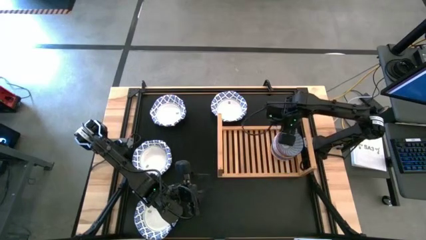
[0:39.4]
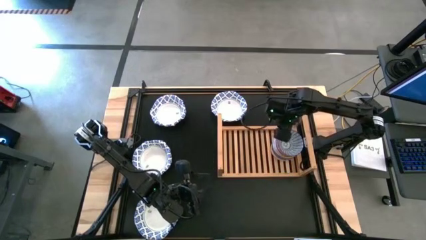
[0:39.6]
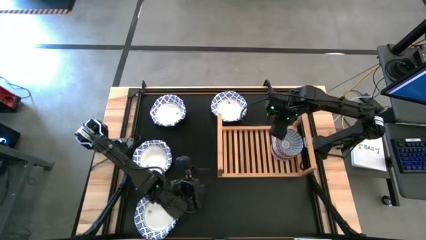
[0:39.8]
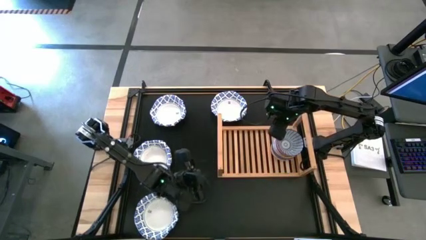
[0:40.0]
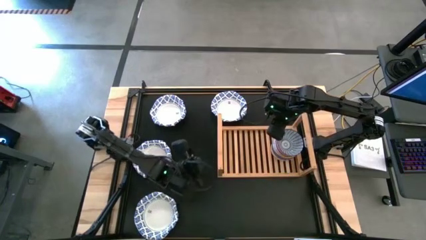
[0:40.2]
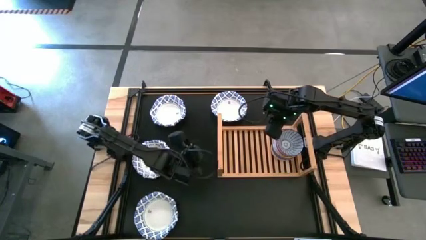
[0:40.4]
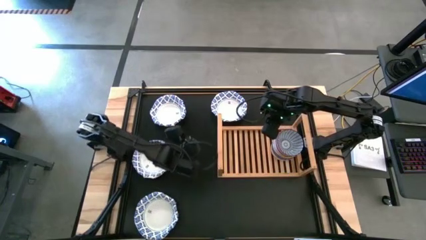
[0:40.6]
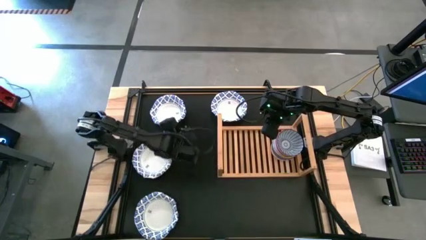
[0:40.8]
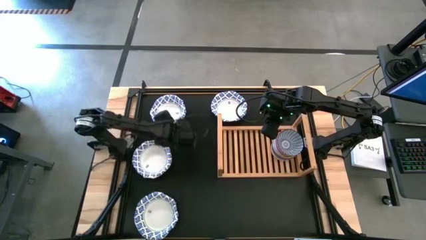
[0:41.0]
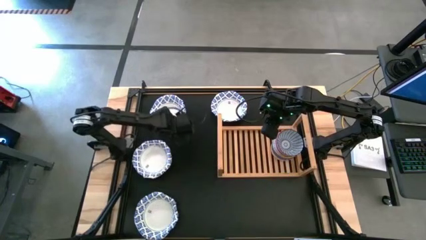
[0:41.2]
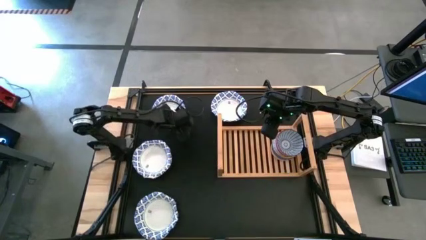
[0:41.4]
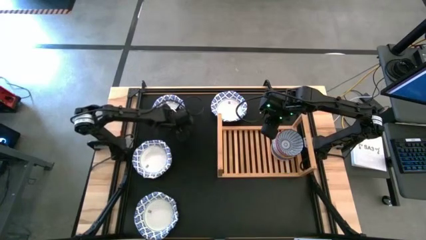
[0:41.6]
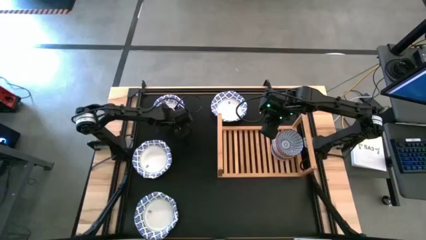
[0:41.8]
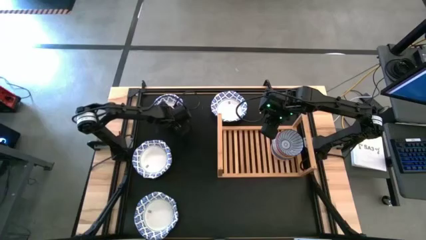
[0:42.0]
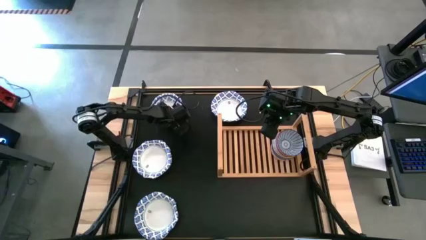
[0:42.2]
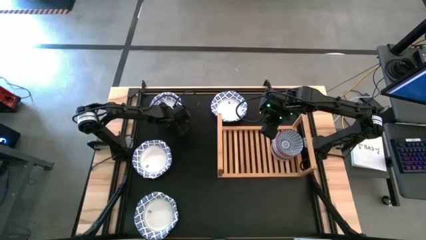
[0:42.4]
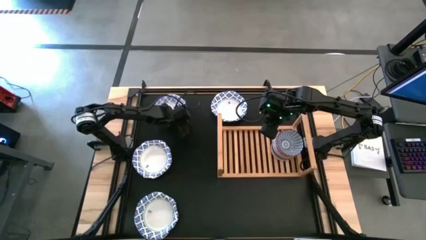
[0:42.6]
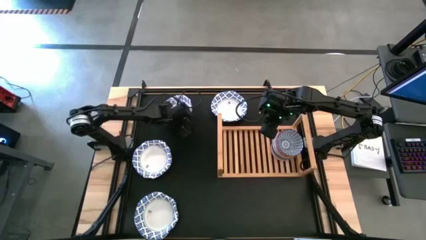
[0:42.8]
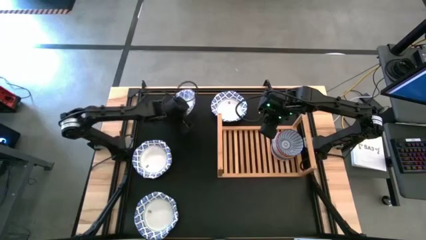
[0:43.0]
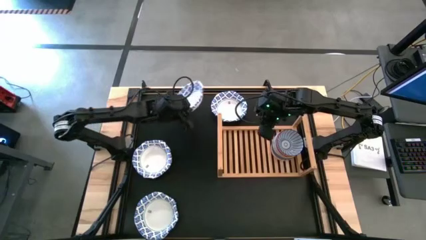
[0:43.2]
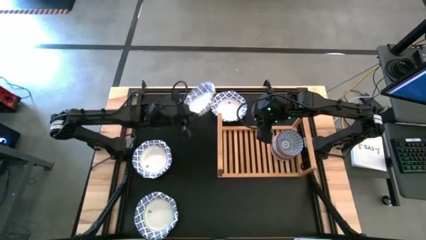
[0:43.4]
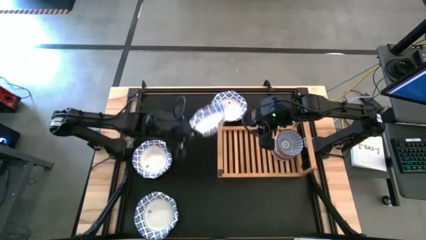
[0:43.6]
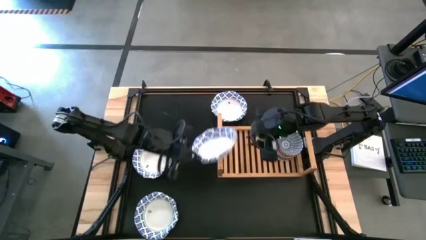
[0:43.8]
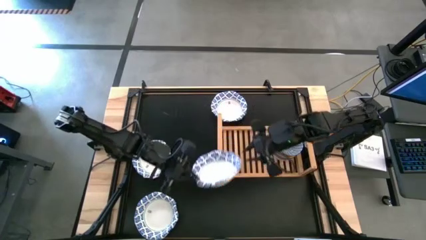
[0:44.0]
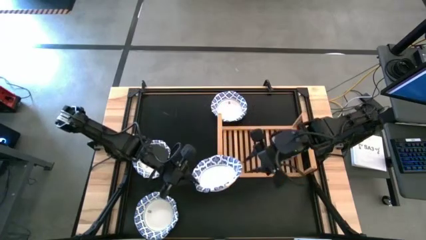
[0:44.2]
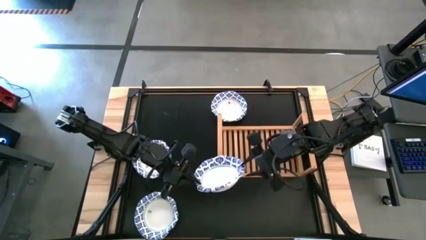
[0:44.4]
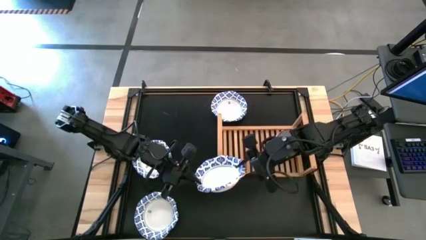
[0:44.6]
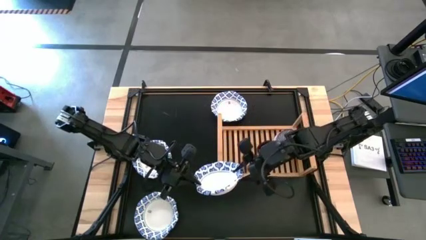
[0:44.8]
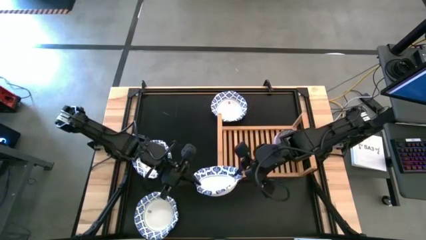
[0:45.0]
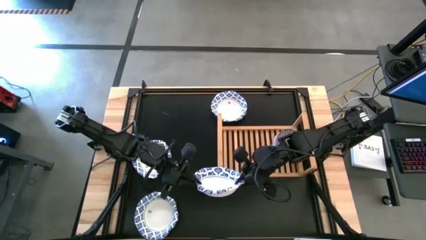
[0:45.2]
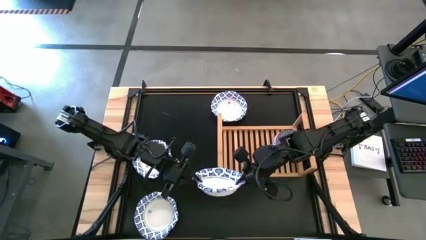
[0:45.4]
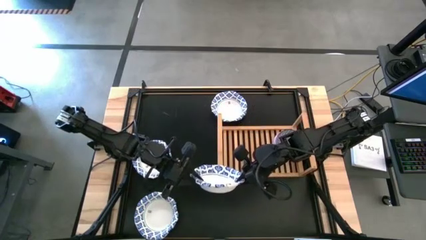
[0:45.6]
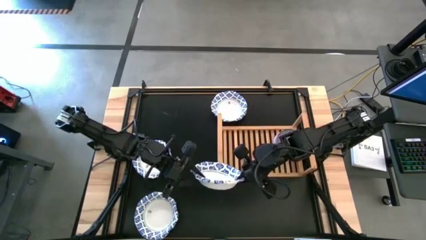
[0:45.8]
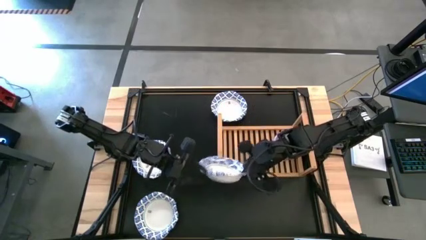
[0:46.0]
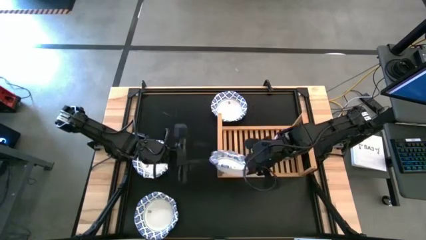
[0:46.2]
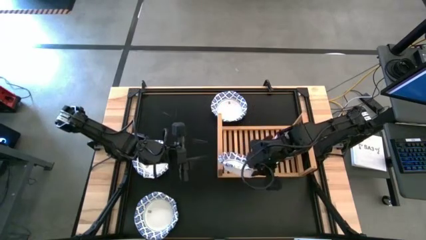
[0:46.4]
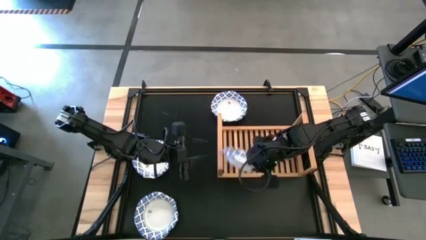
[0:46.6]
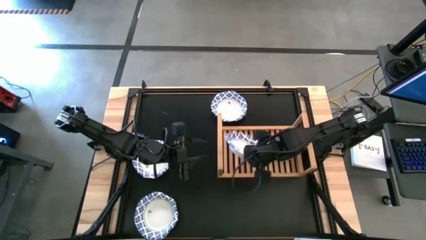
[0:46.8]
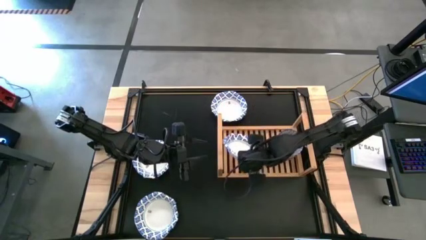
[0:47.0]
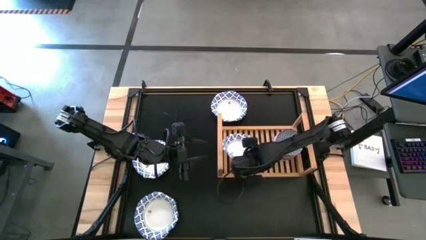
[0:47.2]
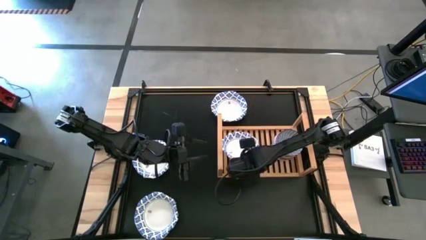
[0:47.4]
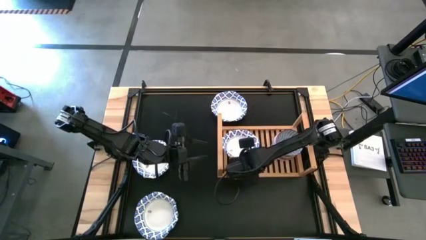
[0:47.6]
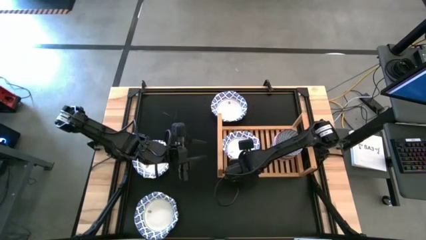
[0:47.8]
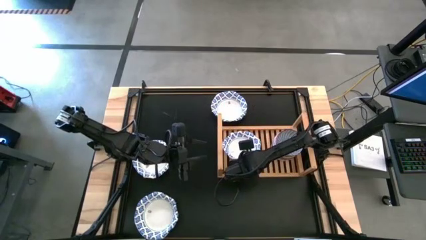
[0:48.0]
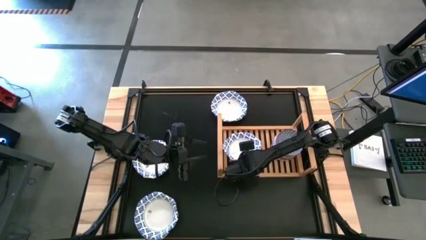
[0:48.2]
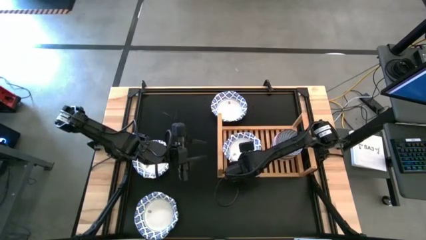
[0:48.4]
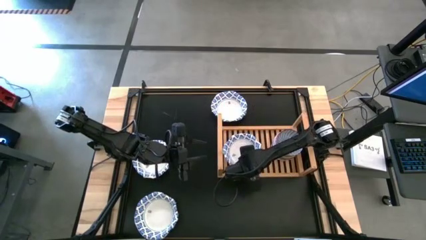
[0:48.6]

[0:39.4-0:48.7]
Task: Place and stack bowls onto a shelf
Put the top left white bowl on the shelf

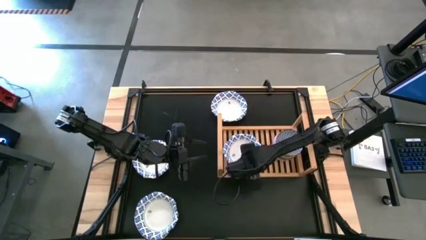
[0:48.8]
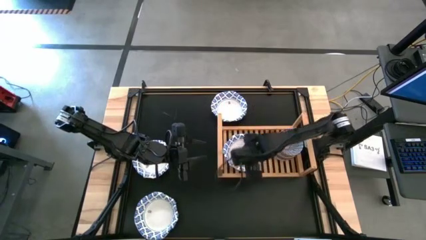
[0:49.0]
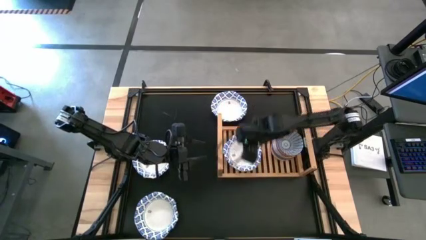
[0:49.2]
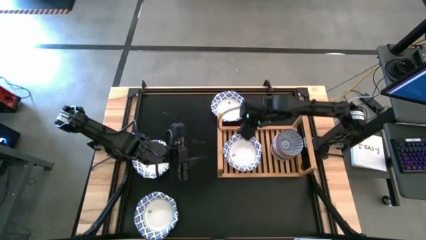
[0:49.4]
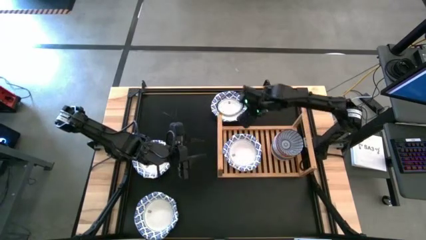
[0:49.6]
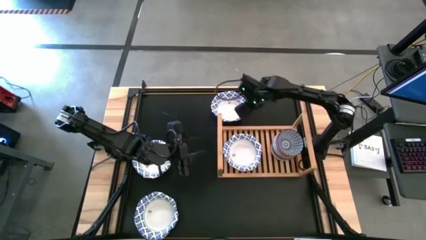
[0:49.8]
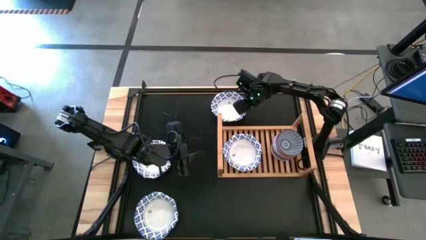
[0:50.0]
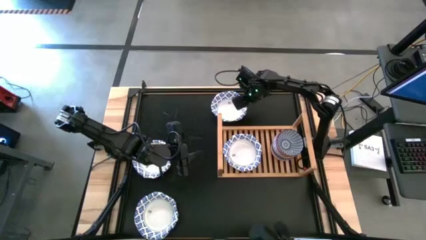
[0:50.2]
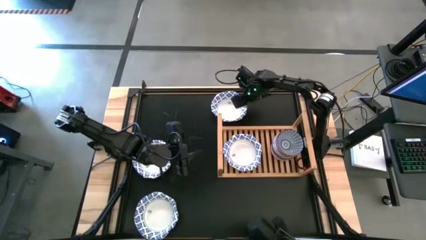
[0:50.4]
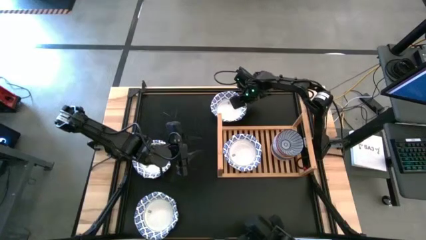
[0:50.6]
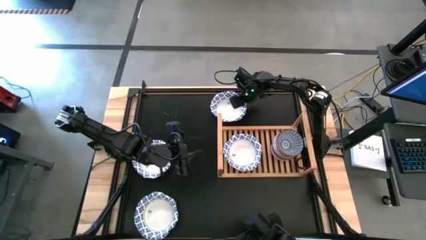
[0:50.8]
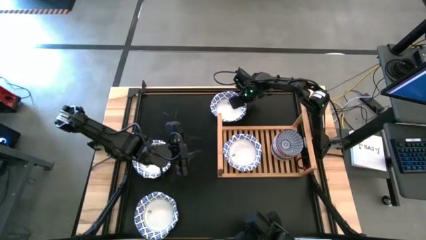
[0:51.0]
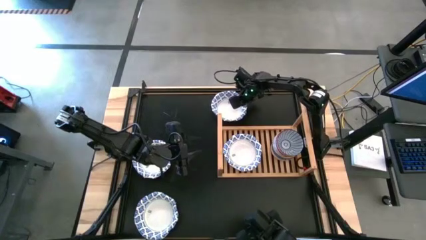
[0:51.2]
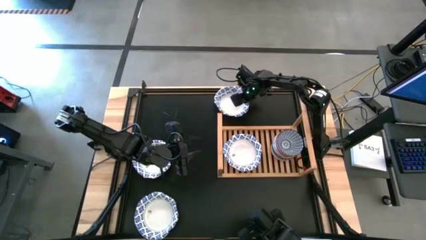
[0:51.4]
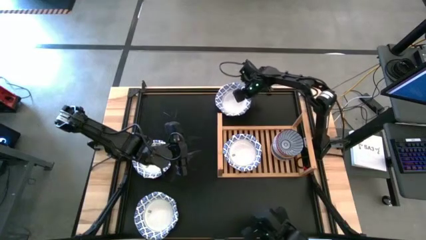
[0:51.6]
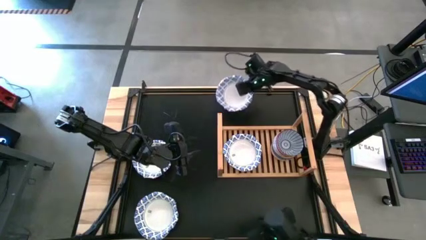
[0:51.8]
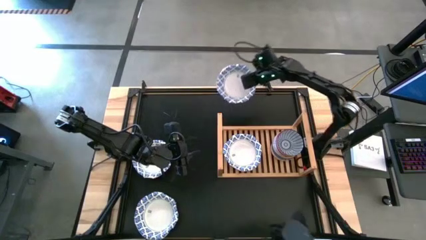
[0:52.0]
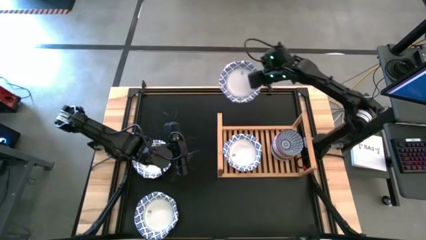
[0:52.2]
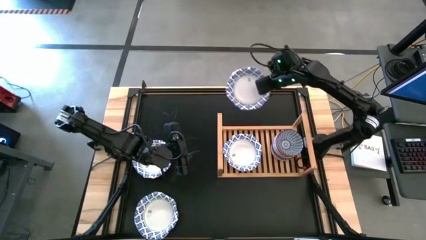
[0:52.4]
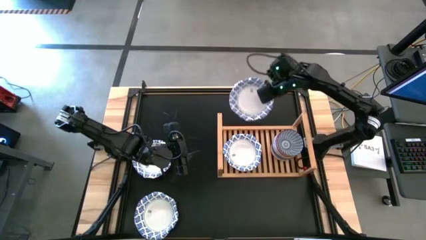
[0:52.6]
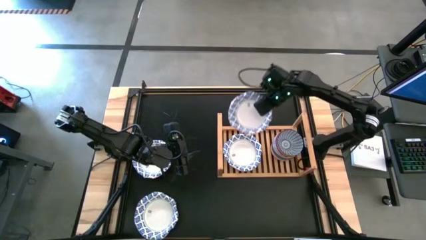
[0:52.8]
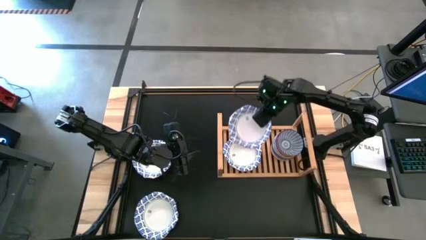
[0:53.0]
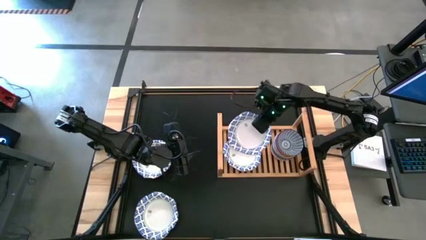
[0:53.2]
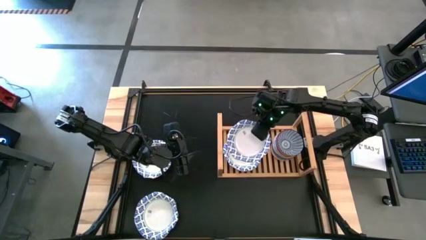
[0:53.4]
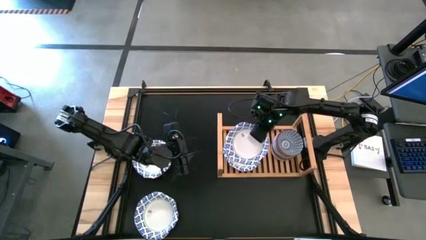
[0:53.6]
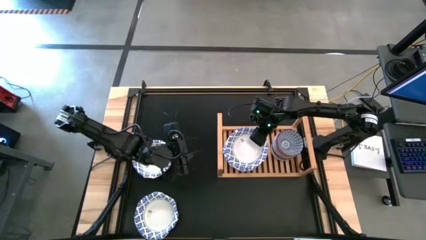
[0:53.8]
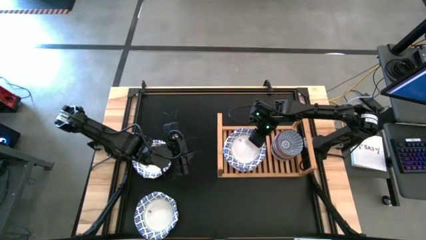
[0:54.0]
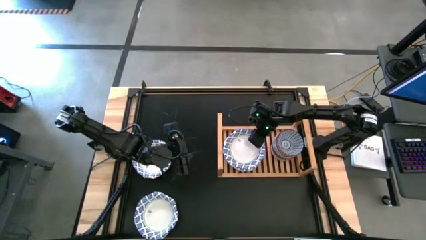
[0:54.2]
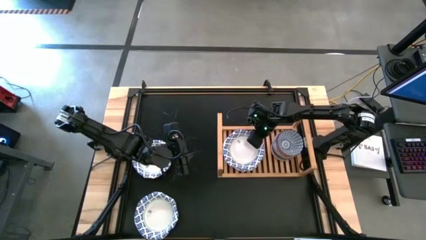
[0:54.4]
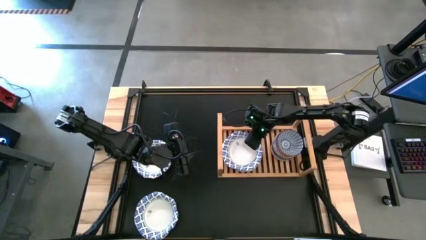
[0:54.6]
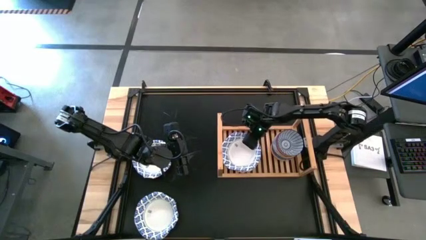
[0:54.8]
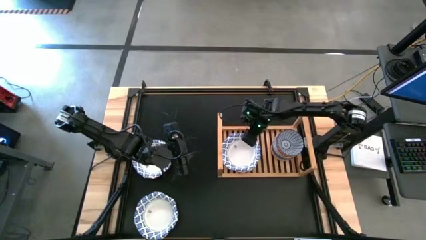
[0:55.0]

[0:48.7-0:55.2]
Stack the top white bowl on top of the white bowl on the shelf

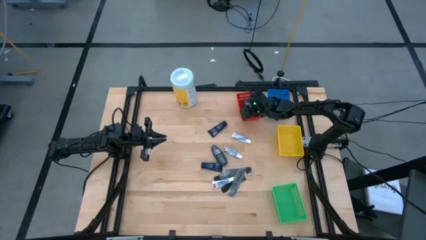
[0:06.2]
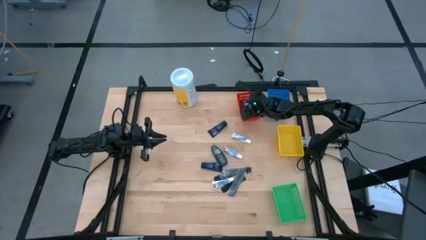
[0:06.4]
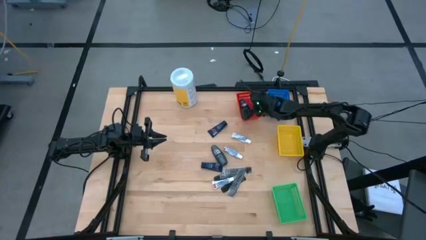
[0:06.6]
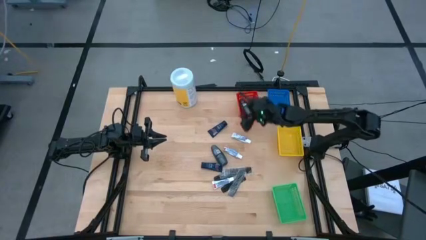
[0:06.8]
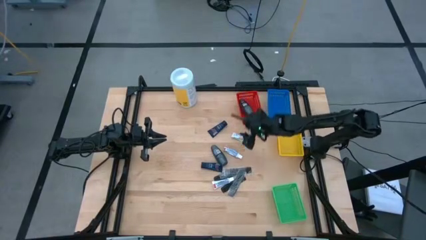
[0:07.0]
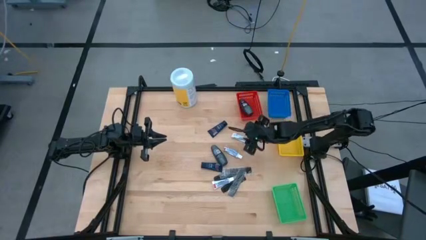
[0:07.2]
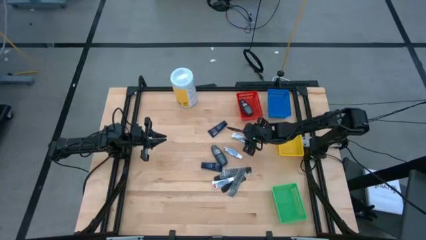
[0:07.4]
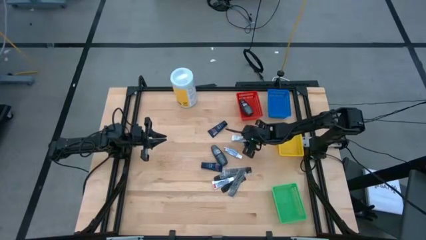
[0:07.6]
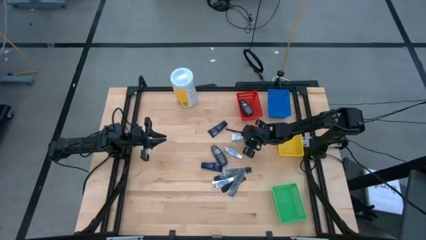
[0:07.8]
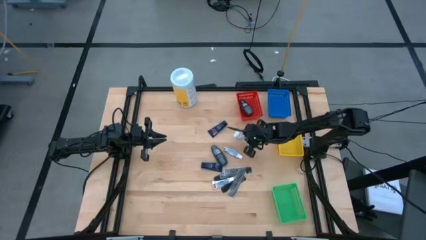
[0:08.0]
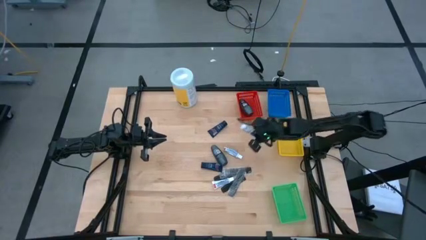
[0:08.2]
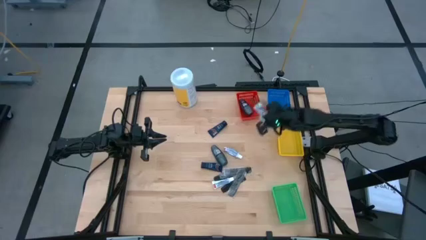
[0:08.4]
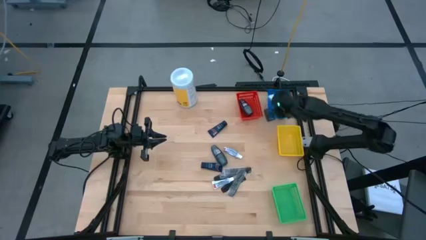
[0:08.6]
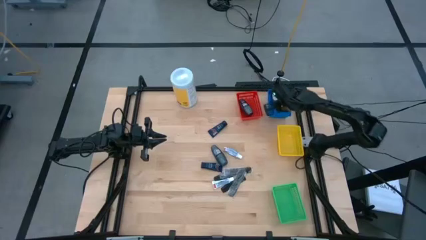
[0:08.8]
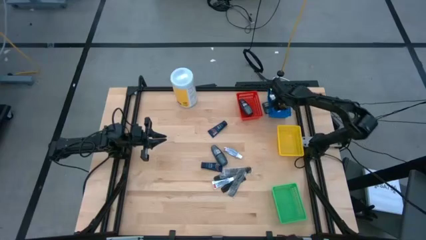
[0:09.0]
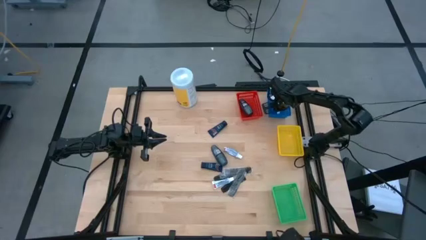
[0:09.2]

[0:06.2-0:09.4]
Task: Pick & Place Travel size toiletries
Put the white toothpaste into the blue bin
